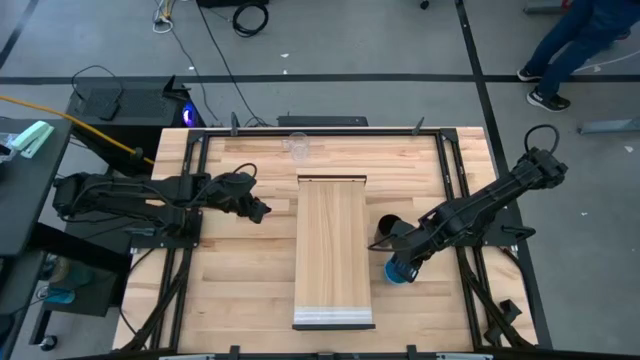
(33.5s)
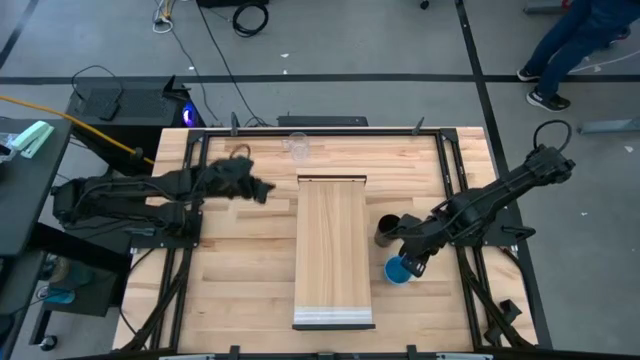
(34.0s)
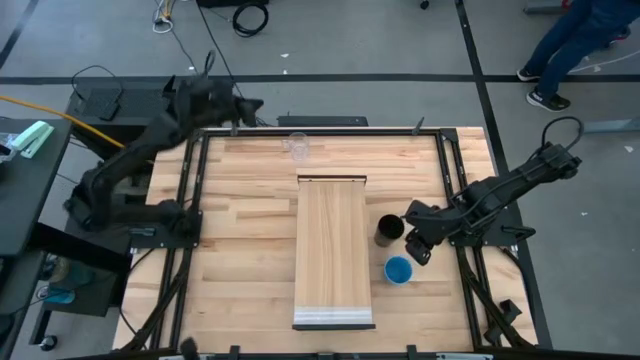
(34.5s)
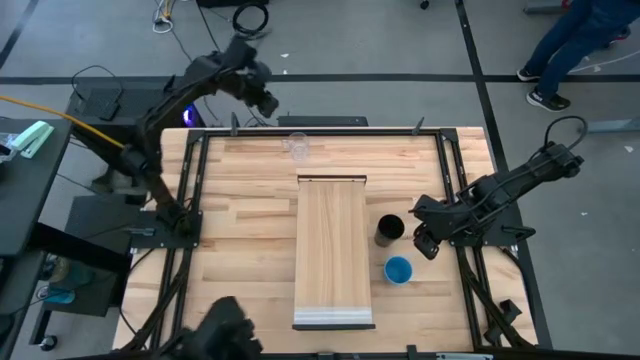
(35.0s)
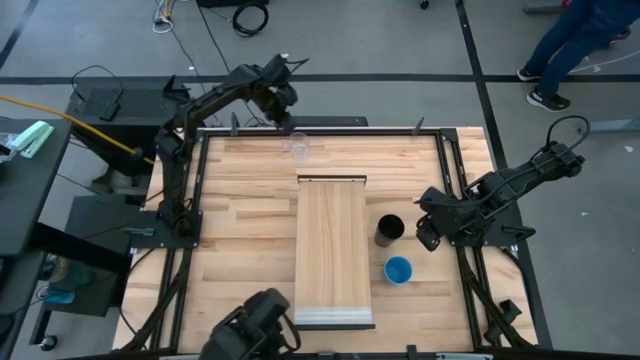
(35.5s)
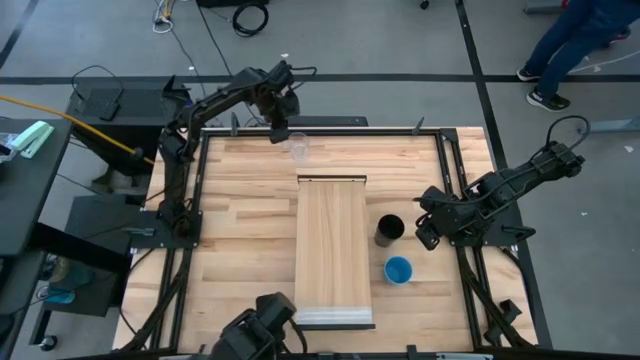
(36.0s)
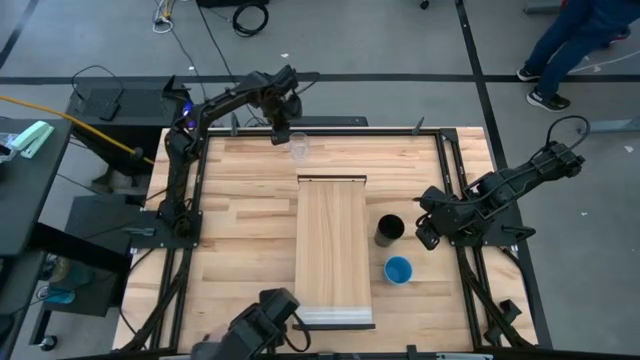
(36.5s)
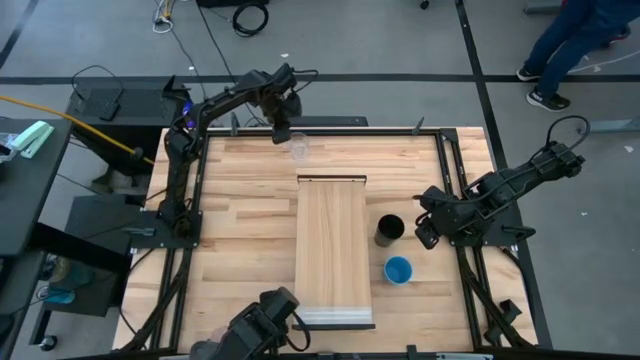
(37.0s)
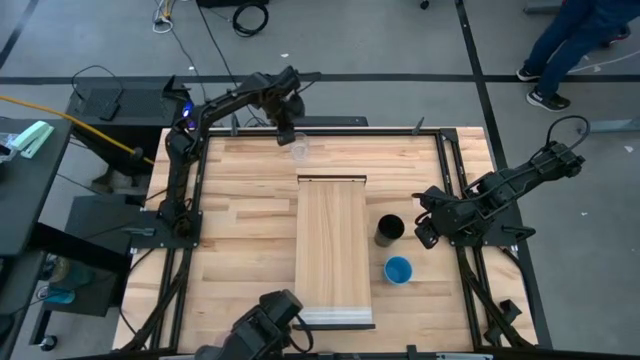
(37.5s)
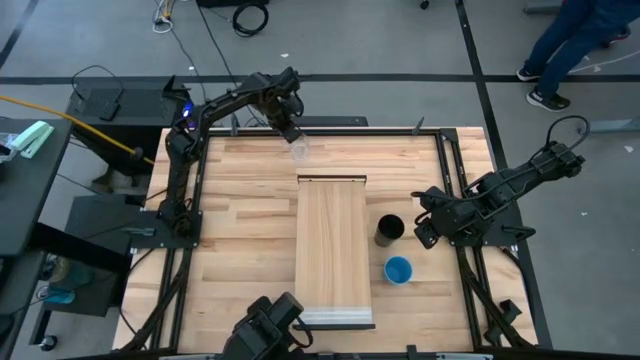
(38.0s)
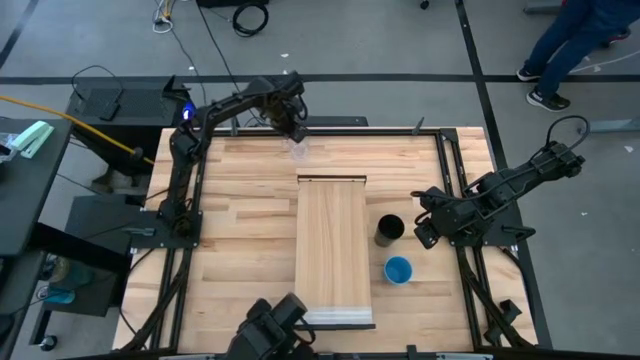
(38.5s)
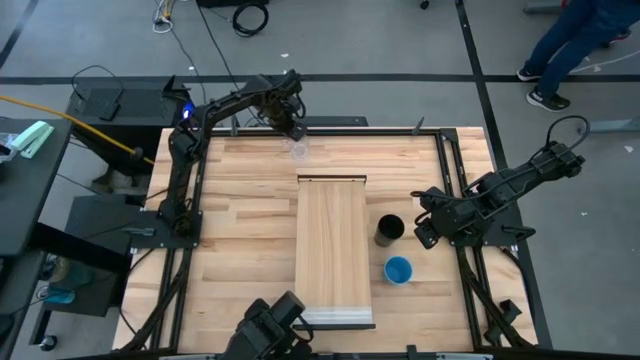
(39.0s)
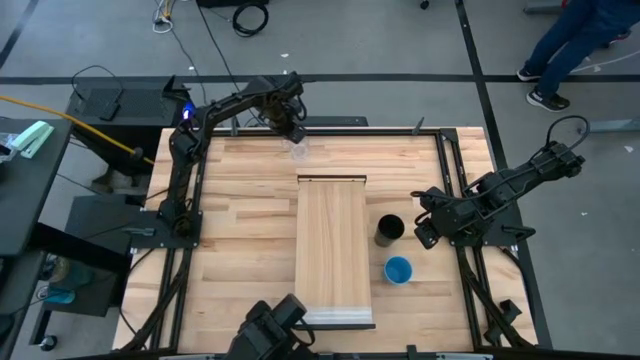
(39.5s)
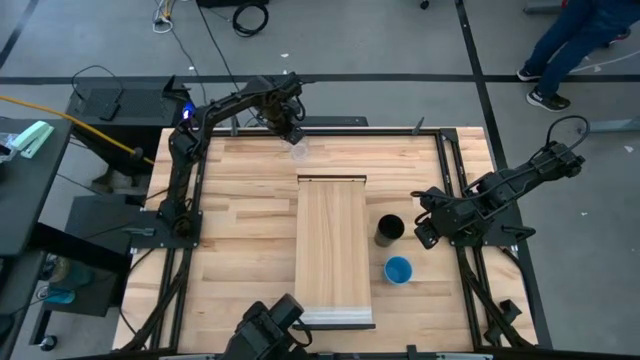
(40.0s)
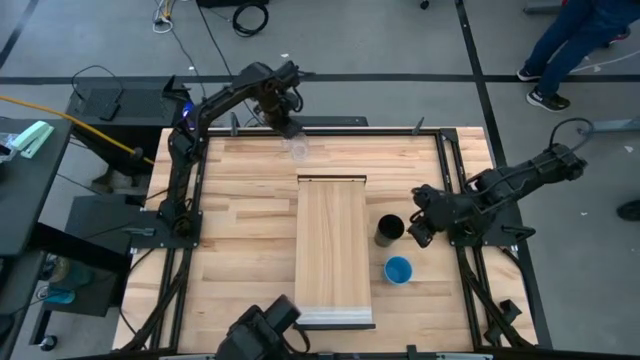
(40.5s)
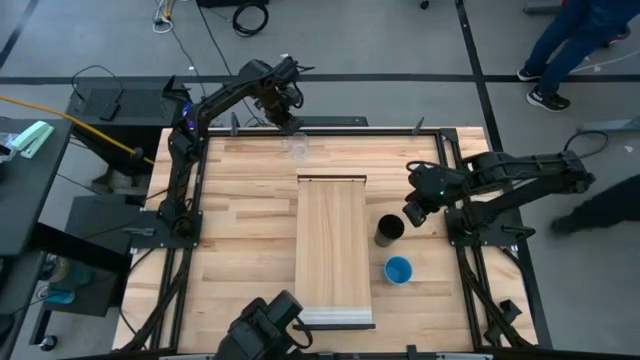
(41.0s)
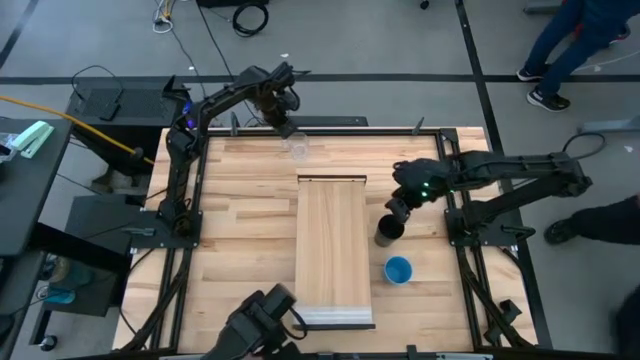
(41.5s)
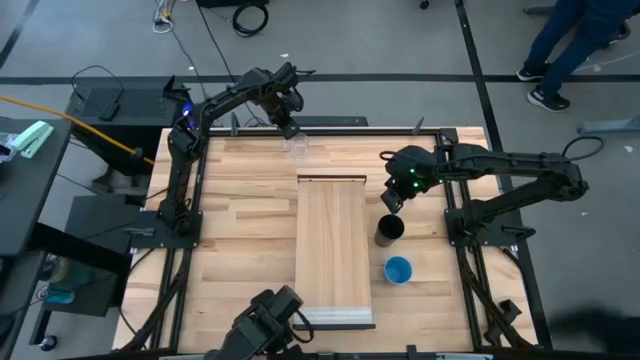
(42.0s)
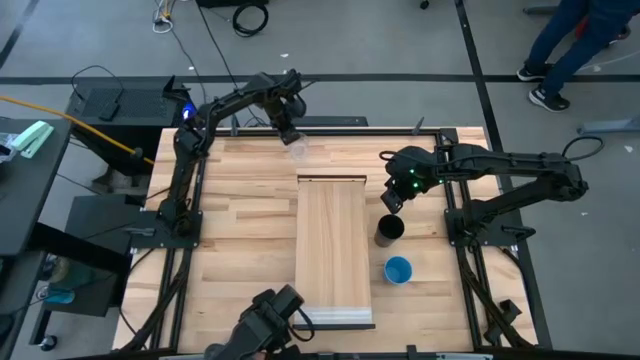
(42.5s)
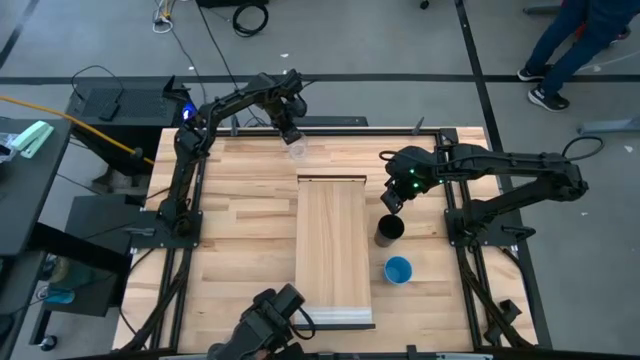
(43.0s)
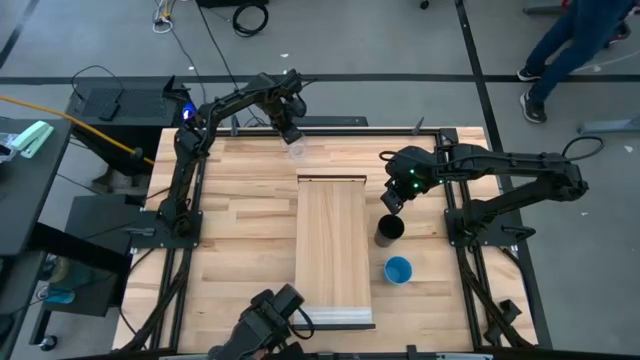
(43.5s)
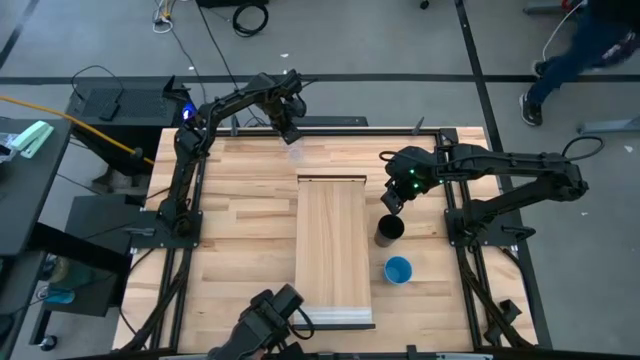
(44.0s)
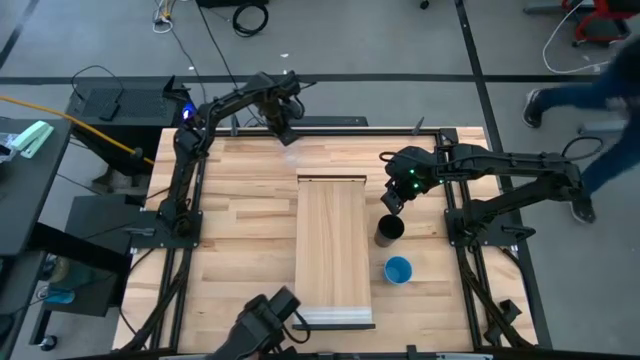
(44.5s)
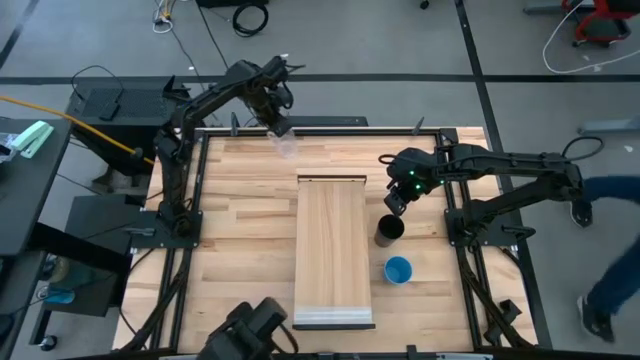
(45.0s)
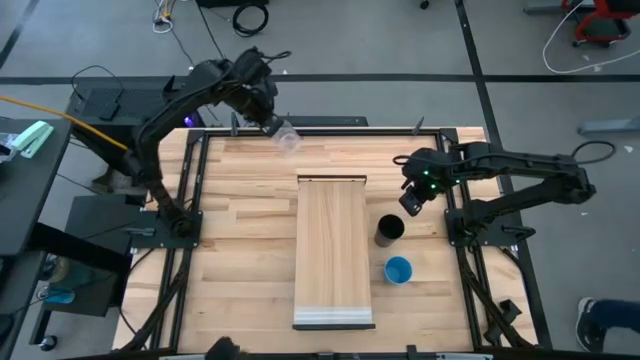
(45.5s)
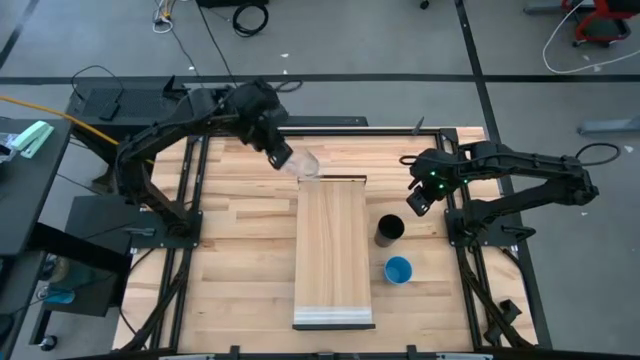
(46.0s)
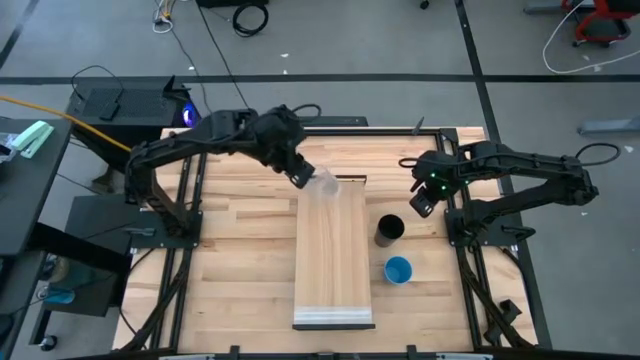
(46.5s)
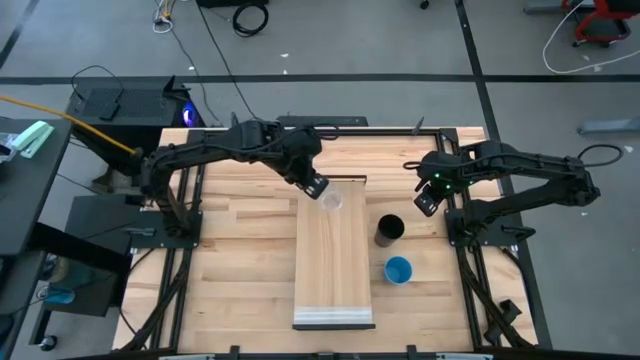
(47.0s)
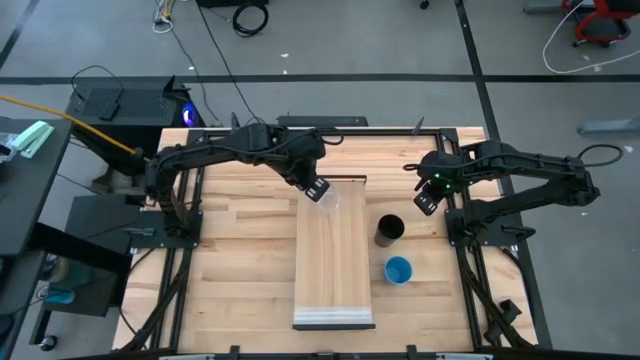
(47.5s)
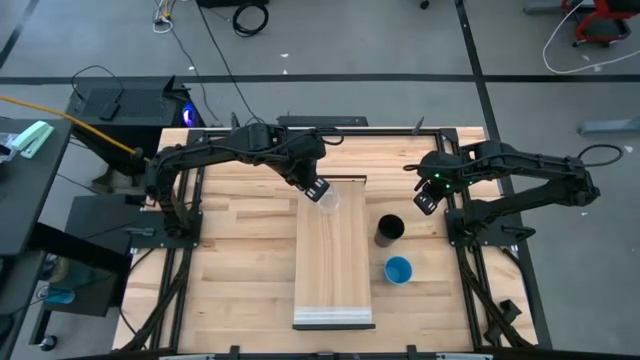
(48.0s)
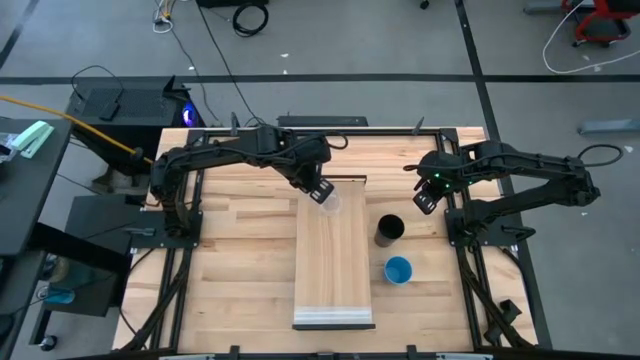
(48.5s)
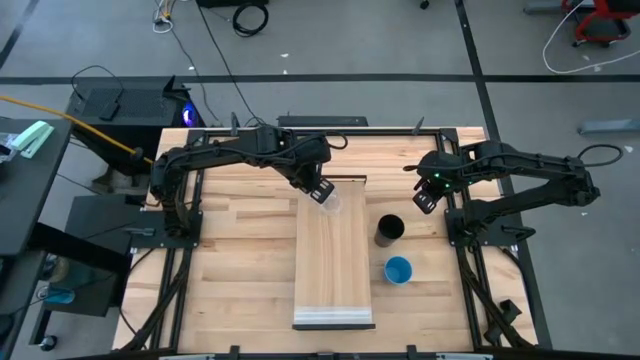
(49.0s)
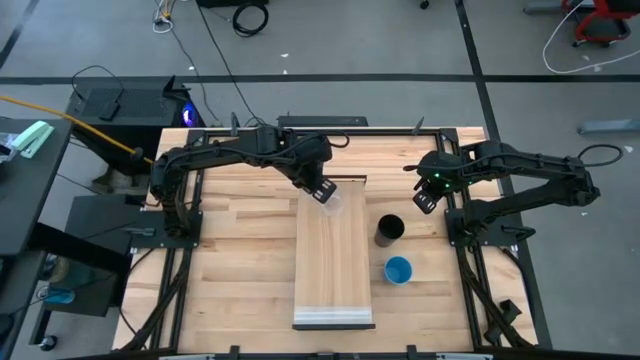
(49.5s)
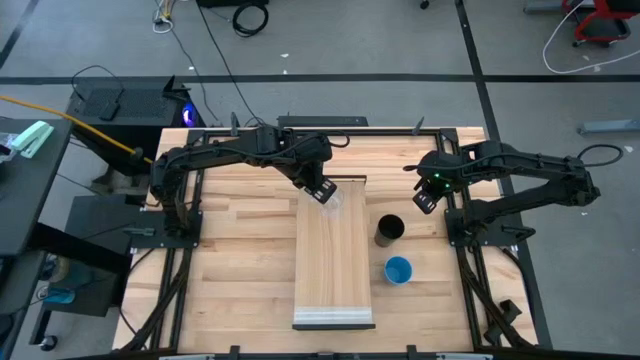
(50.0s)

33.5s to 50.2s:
Task: Stack small to large cups/mugs on shelf
Put the transparent cup on the shelf

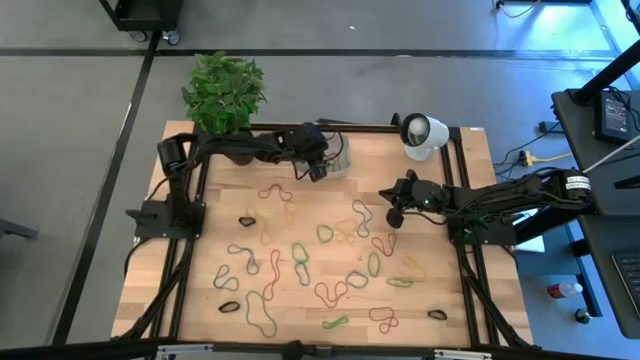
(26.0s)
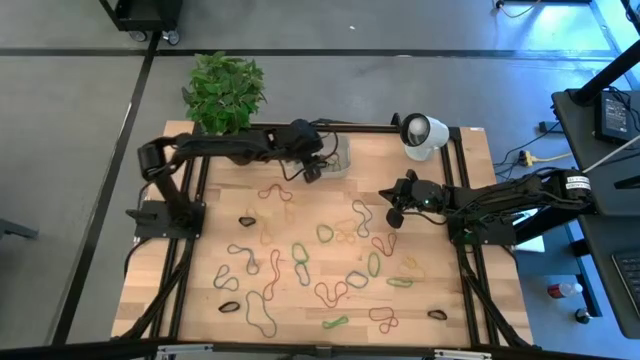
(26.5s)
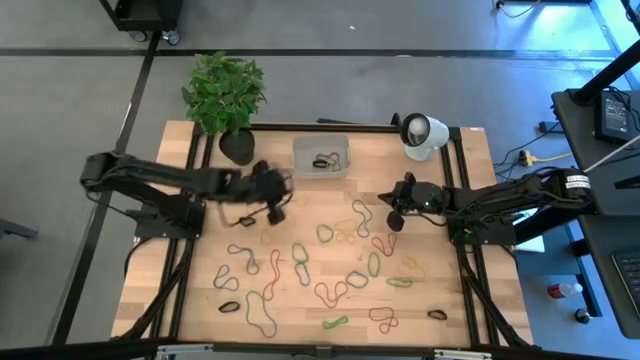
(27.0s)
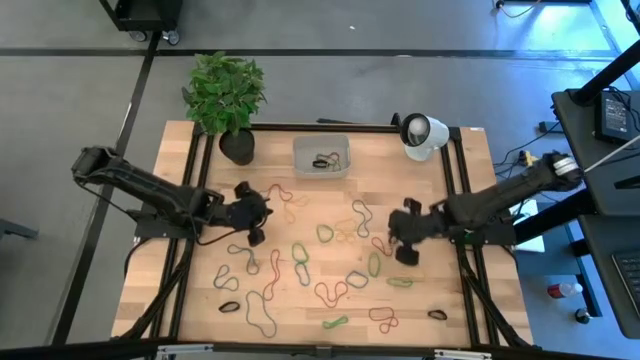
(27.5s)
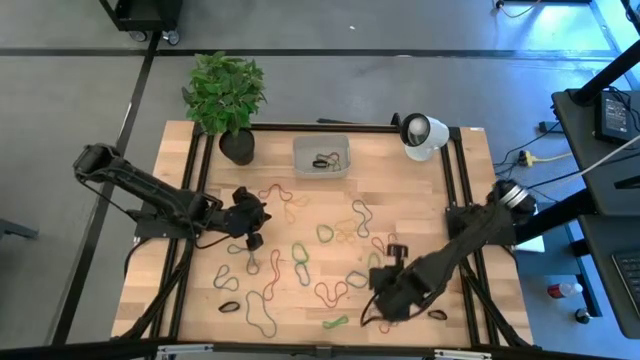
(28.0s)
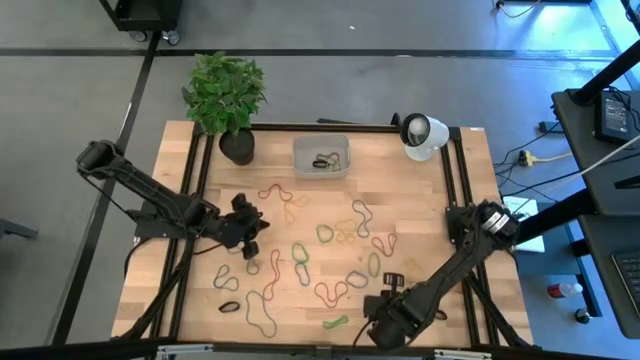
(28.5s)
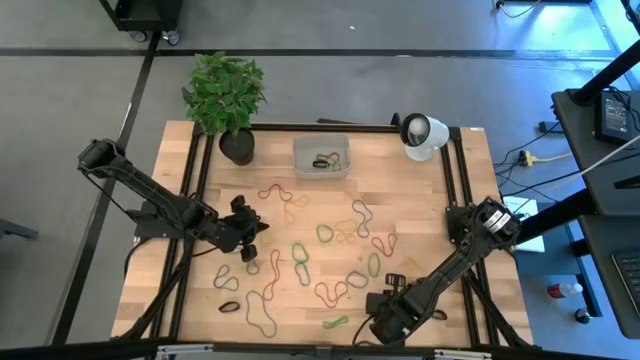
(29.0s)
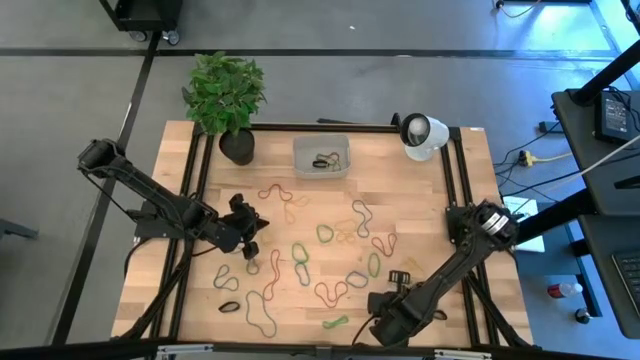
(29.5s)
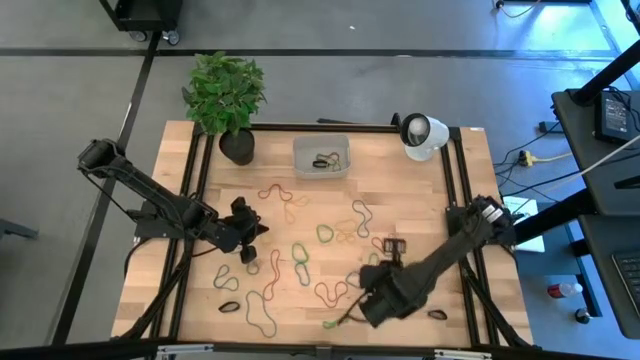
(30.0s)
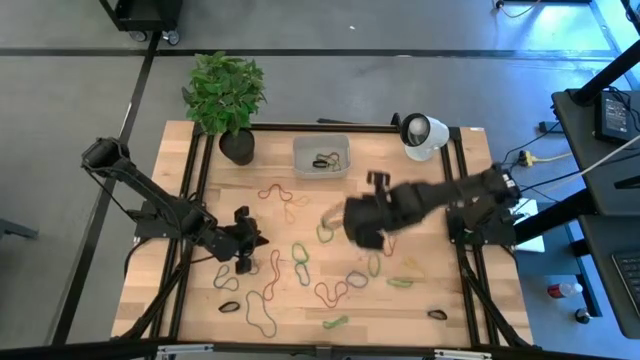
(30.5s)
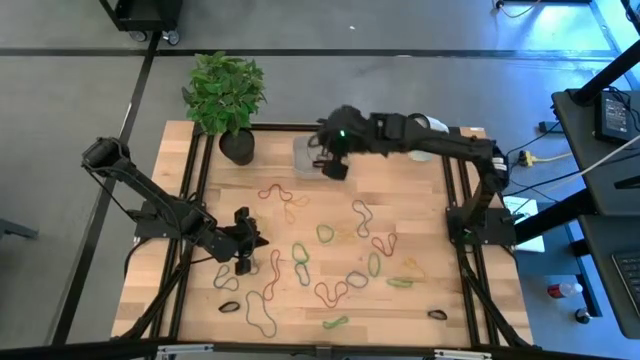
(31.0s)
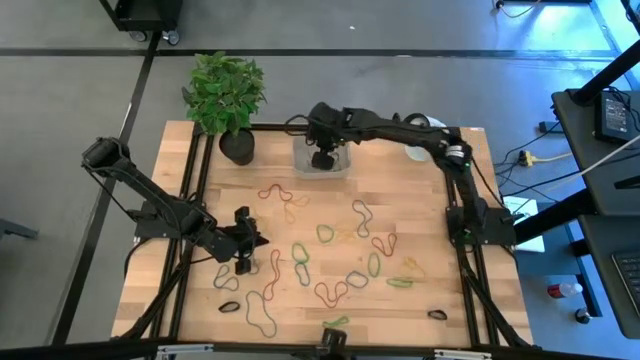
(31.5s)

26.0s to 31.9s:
Task: Pick and place rubber bands into bin
Put the red rubber band into the gray bin
